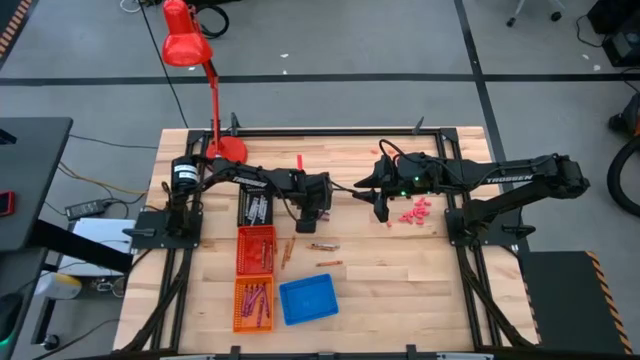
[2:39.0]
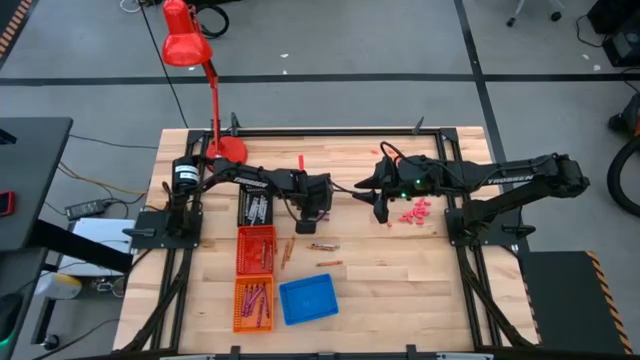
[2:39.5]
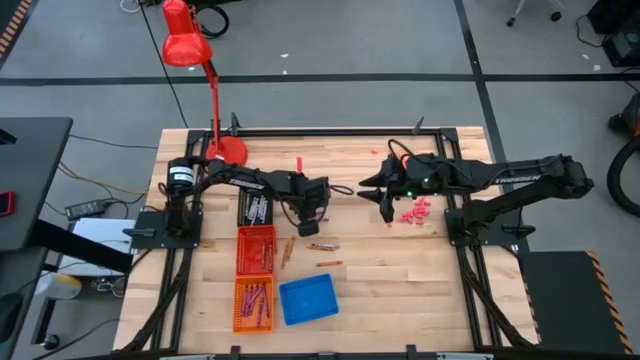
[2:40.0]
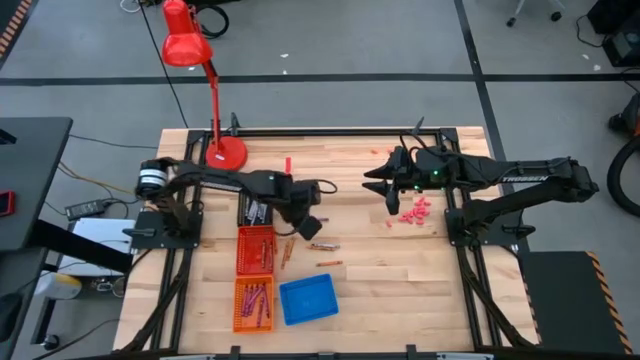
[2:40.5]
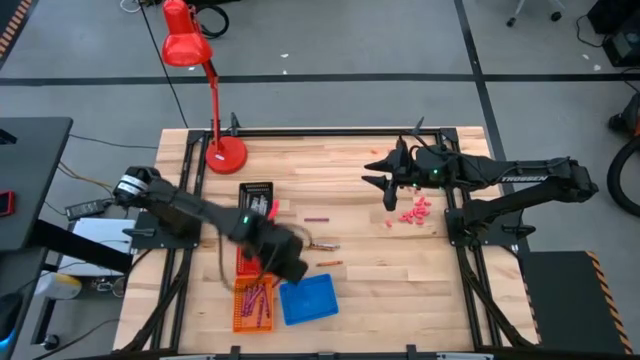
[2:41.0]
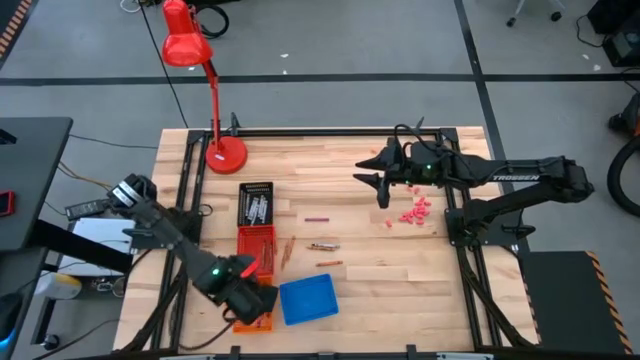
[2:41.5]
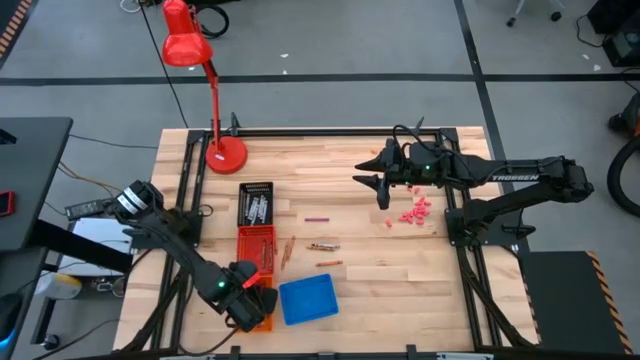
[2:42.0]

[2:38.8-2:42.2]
Task: Sort crayons
Put the red crayon into the orange bin

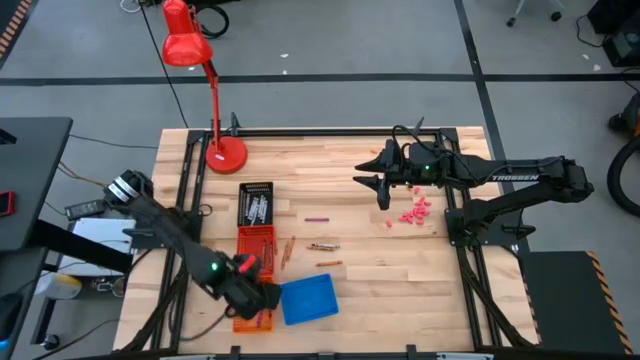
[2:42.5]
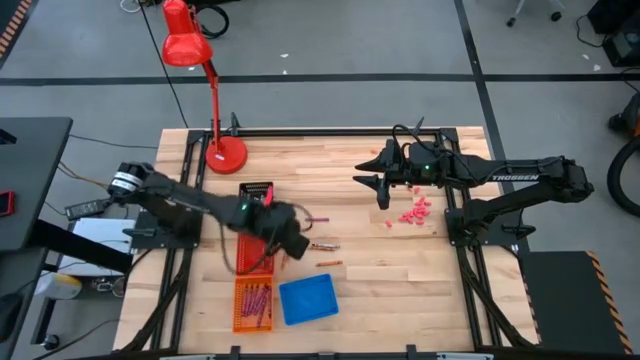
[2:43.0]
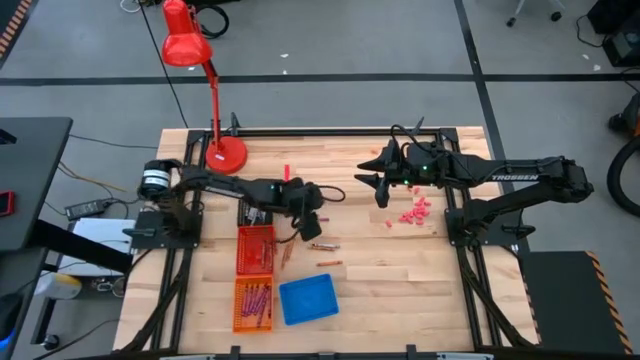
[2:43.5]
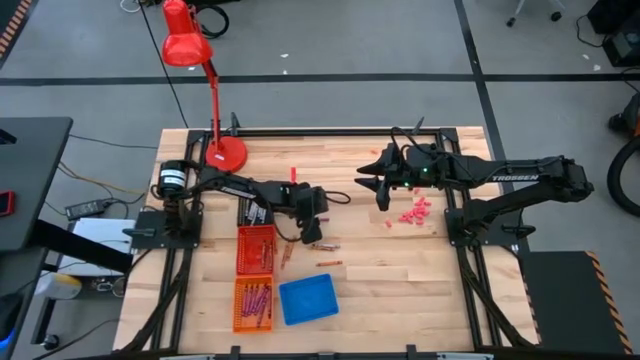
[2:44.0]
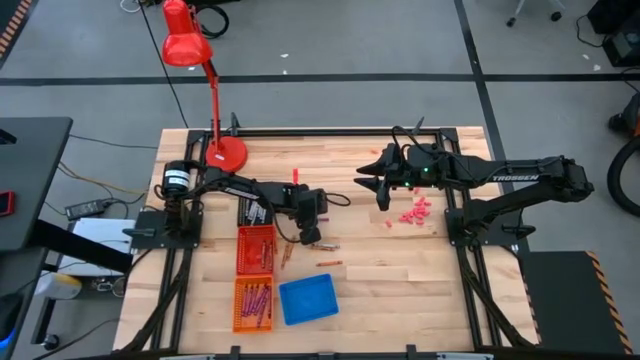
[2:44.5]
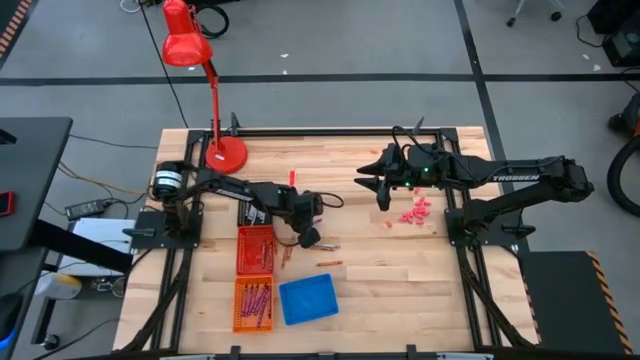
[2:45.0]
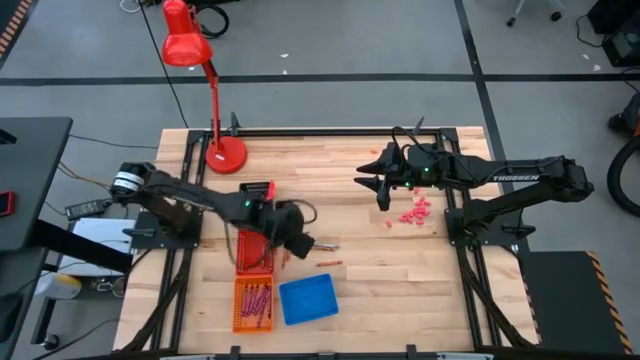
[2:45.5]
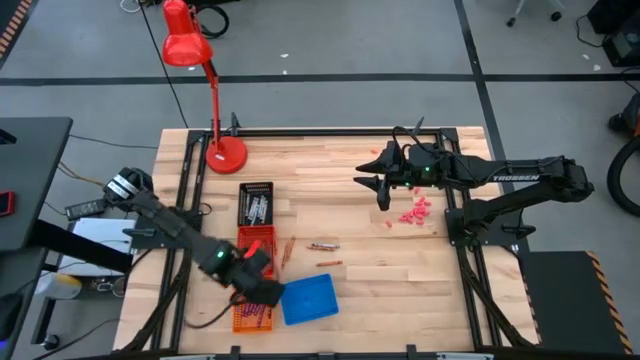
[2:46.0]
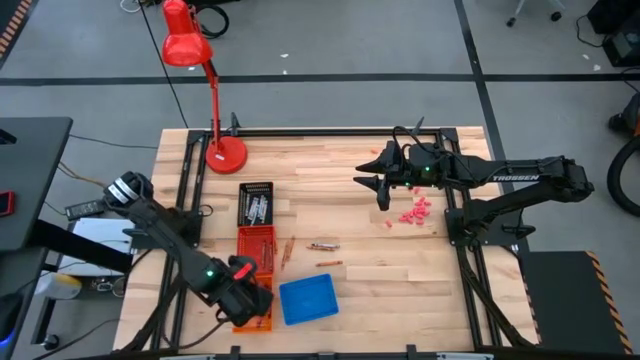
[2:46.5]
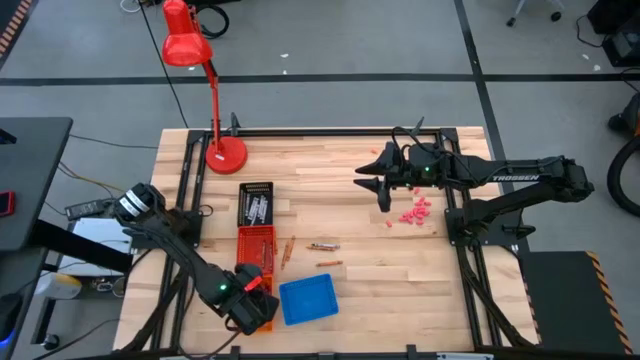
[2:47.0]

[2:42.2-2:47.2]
Put the red crayon into the orange bin

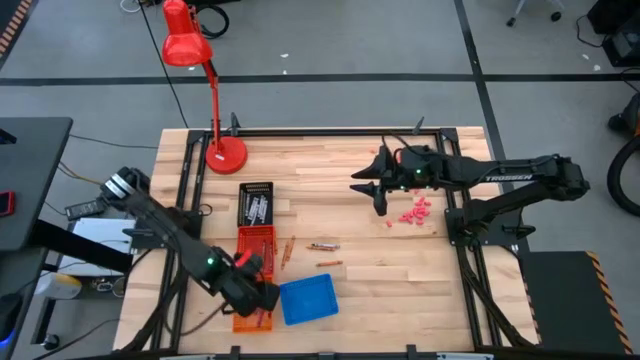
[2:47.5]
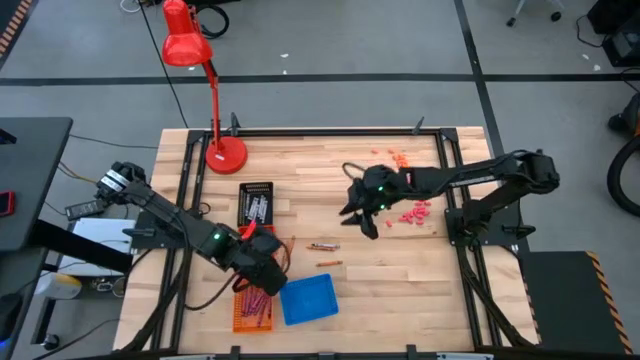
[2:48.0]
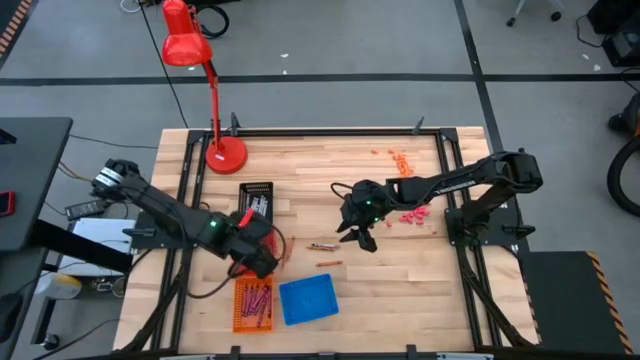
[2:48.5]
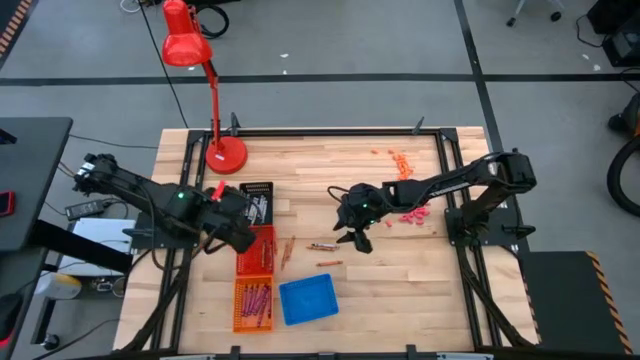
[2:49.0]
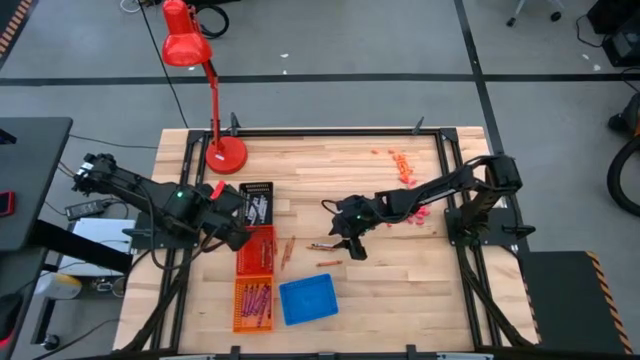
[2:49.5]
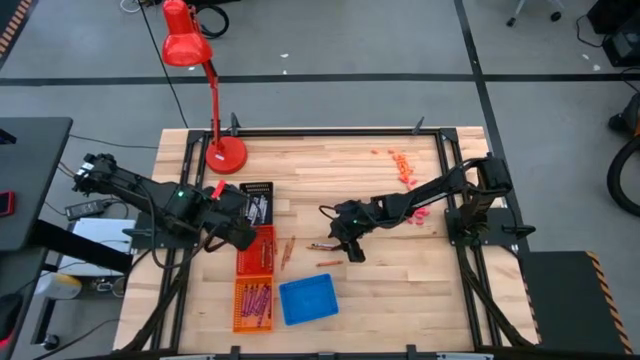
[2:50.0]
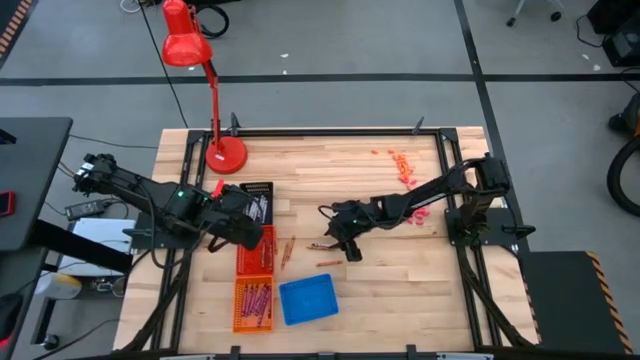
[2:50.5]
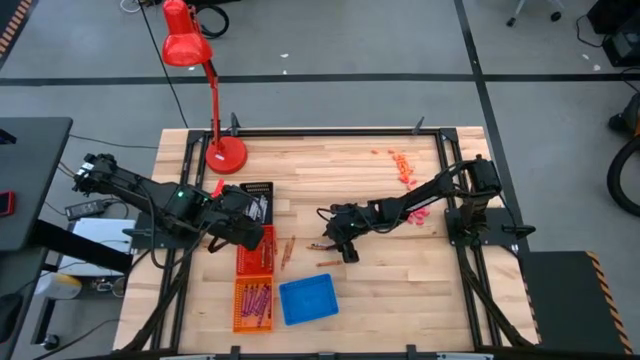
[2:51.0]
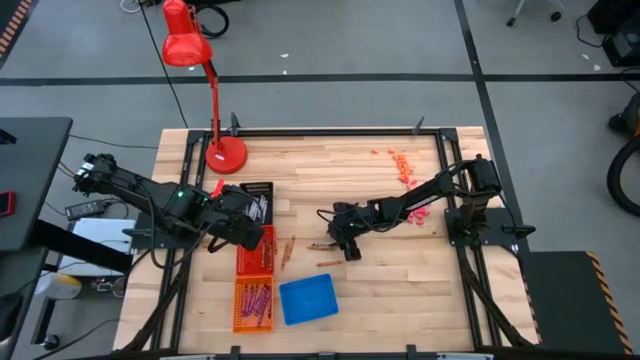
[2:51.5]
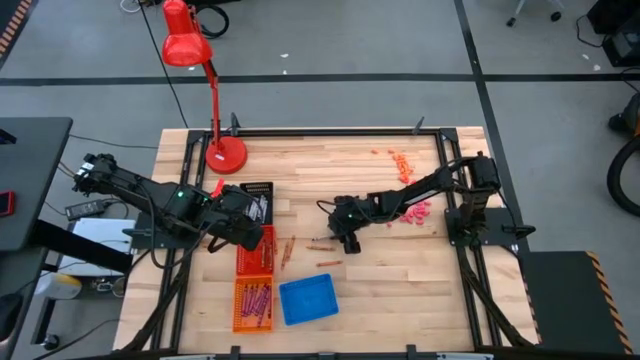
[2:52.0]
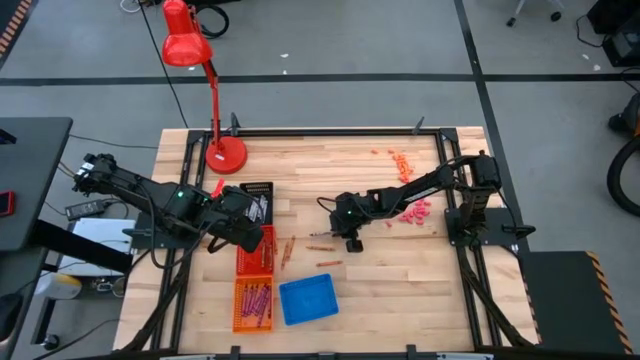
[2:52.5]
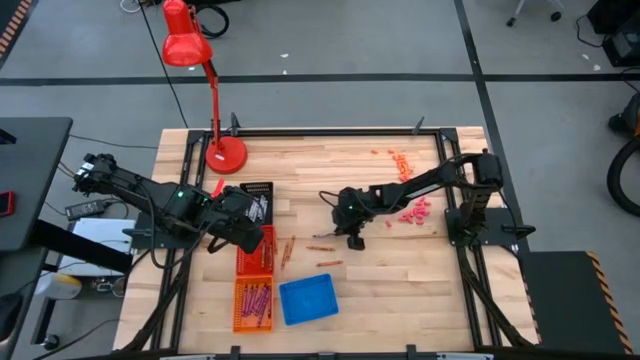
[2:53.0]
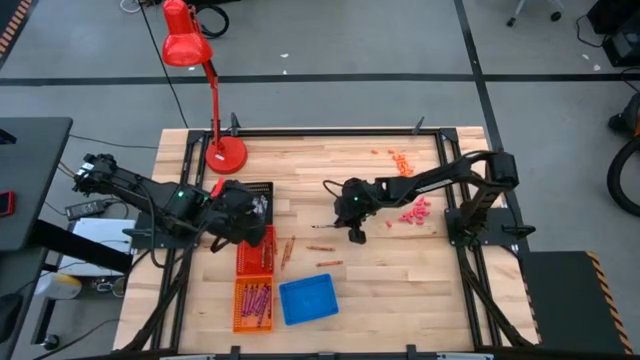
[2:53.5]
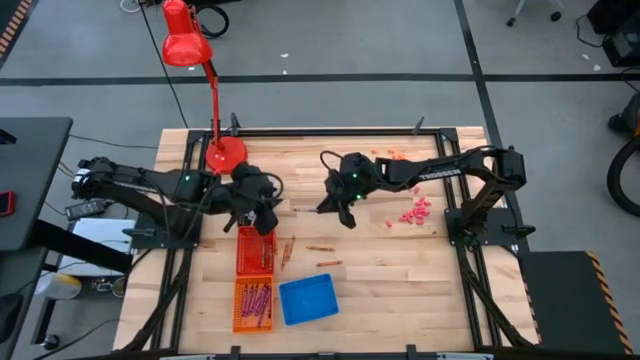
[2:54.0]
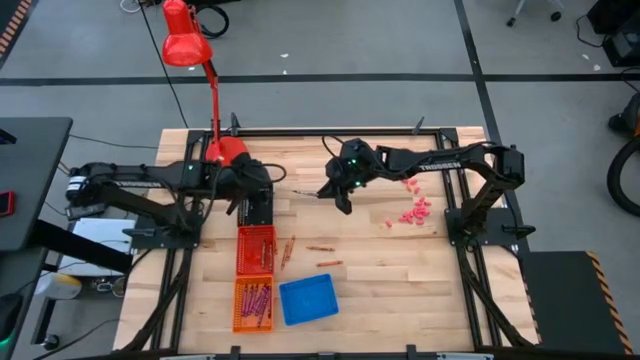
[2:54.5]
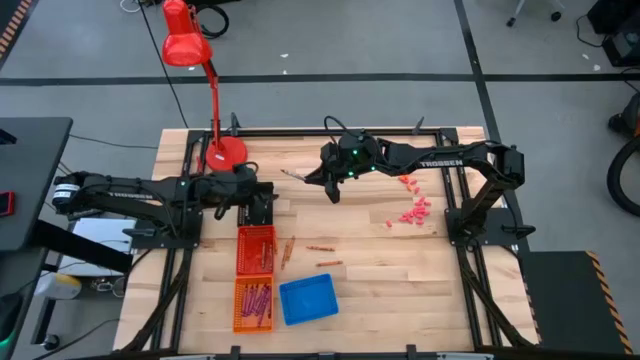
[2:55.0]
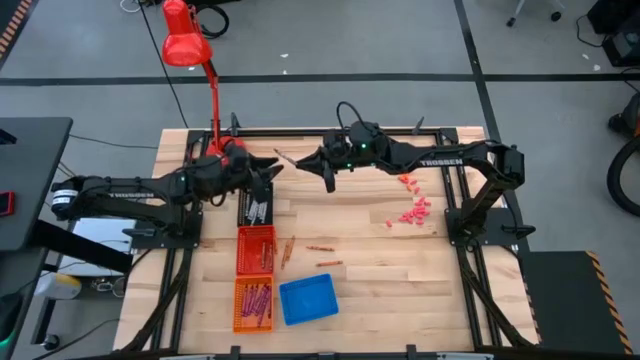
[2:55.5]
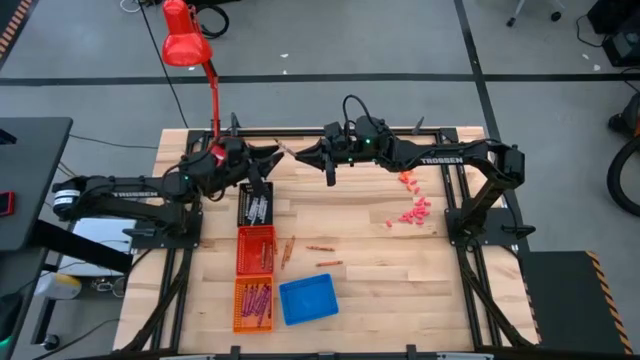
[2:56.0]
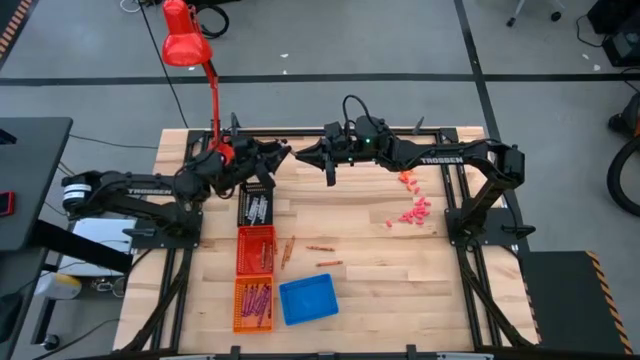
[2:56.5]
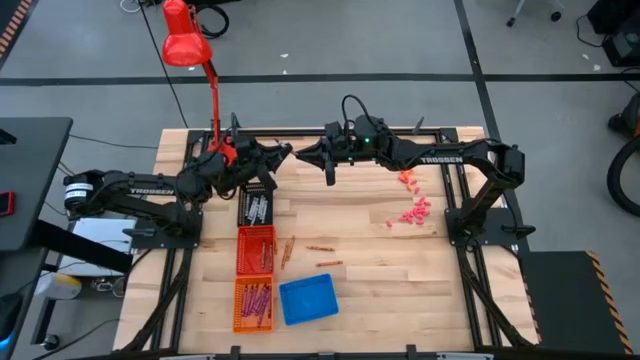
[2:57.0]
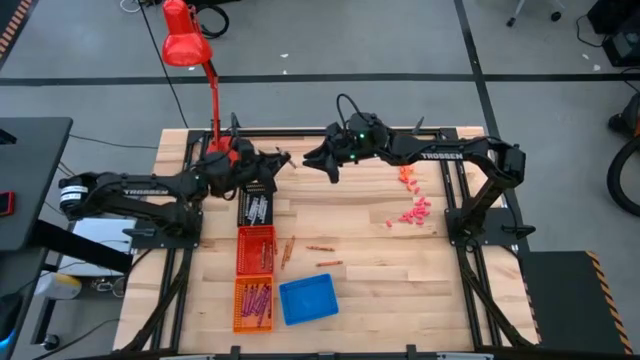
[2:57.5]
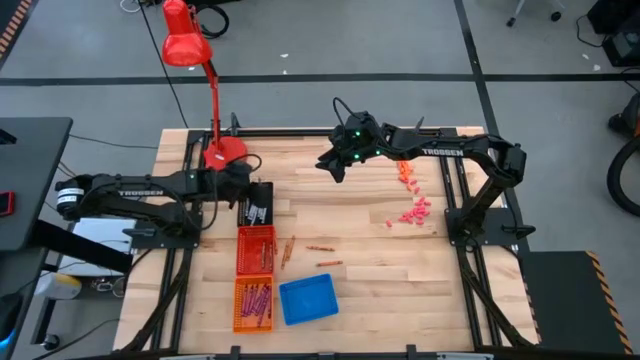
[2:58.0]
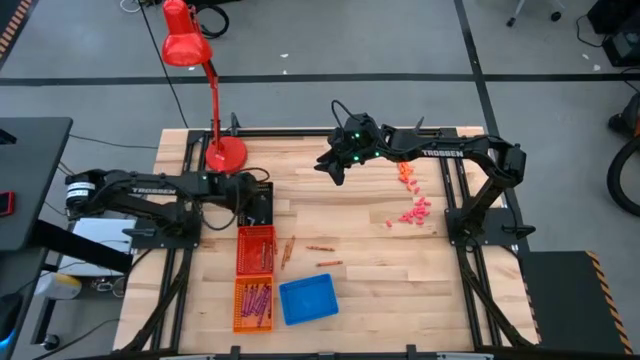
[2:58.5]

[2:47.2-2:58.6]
Put the black crayon into the black bin
